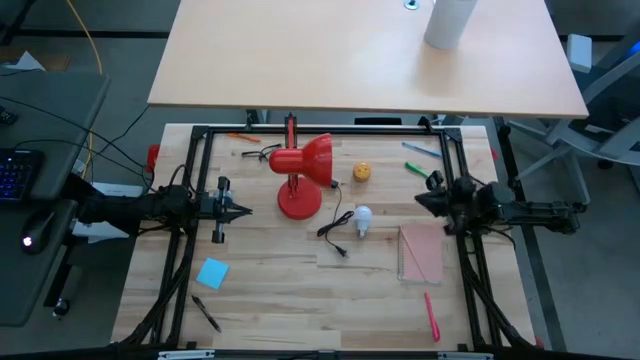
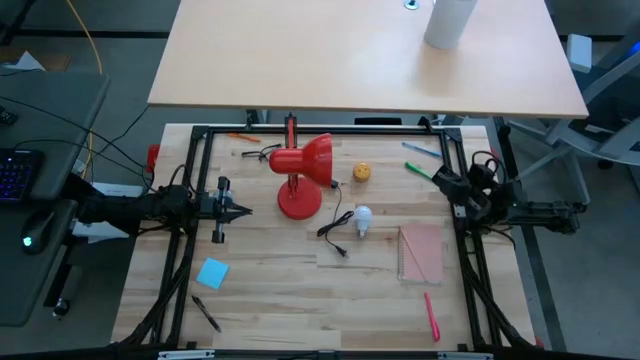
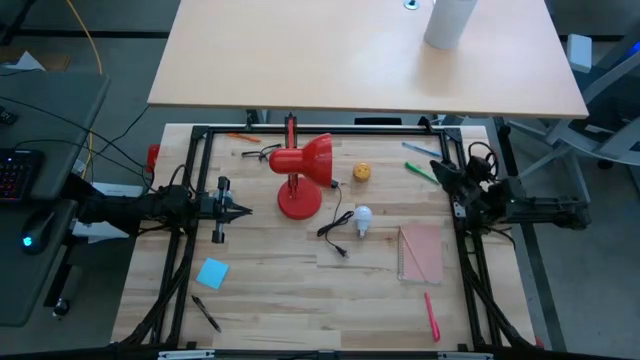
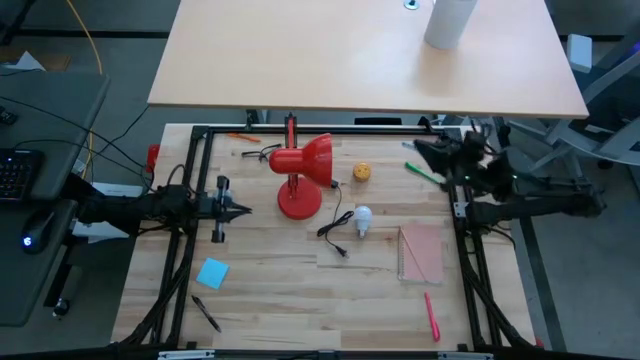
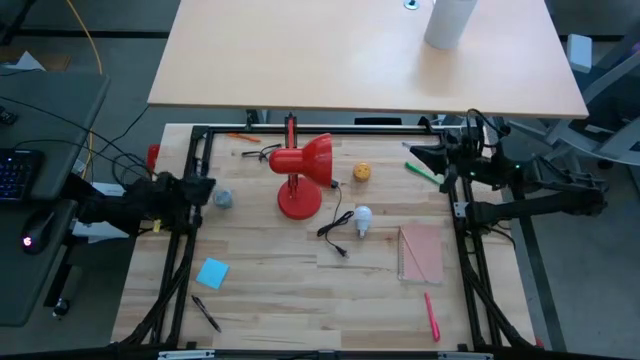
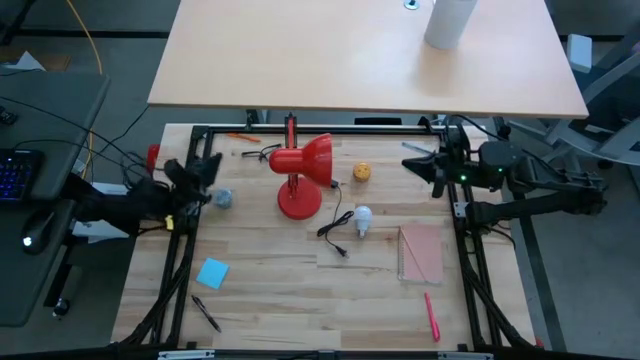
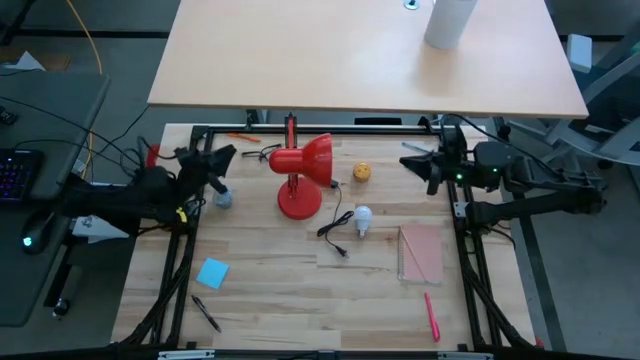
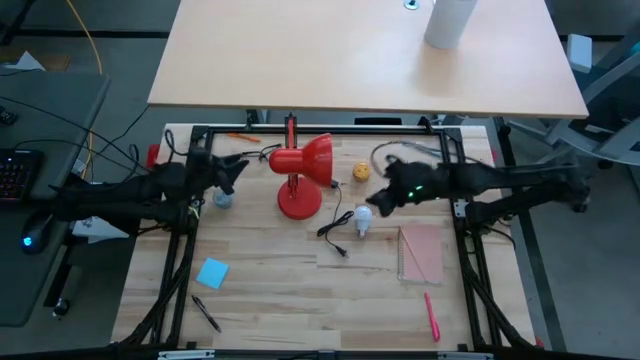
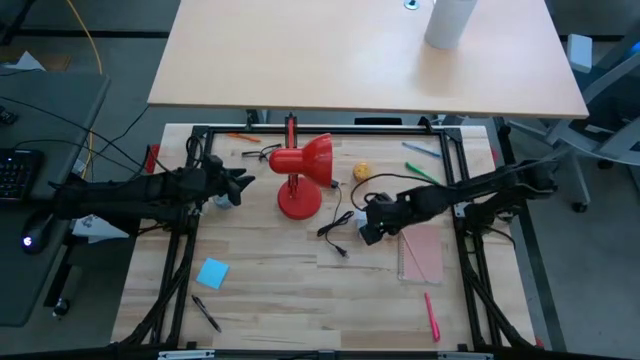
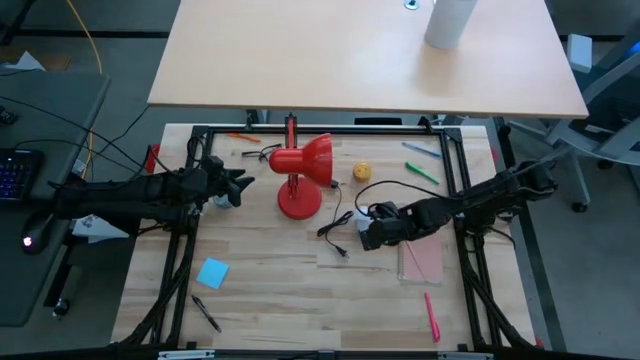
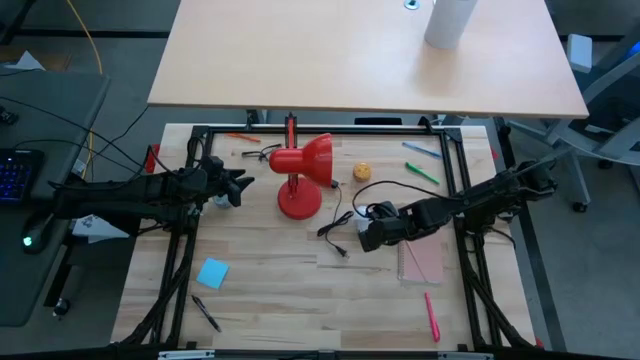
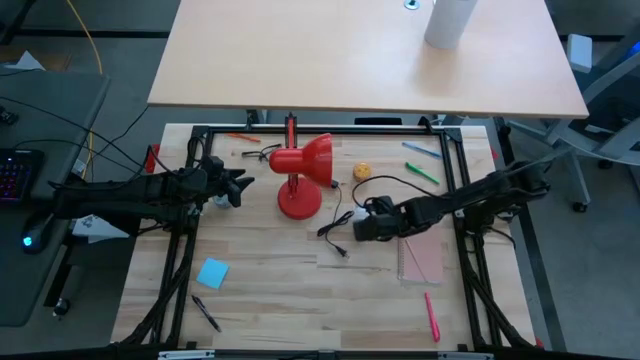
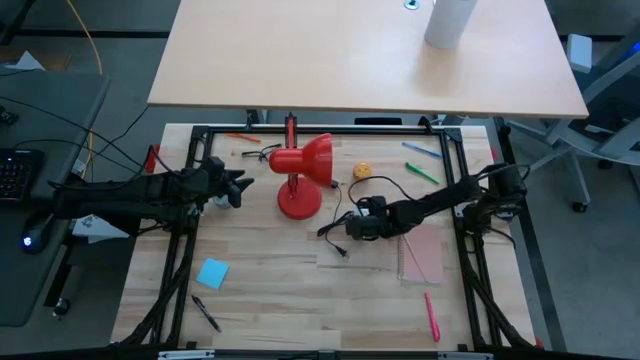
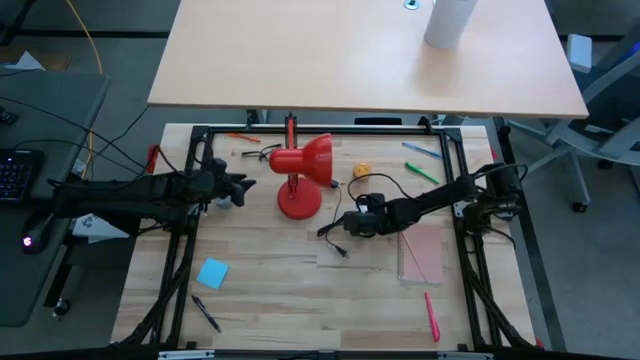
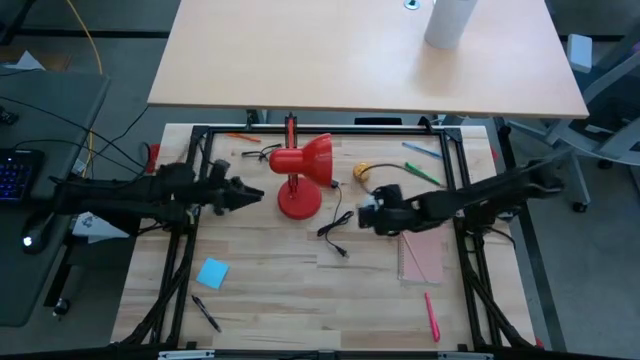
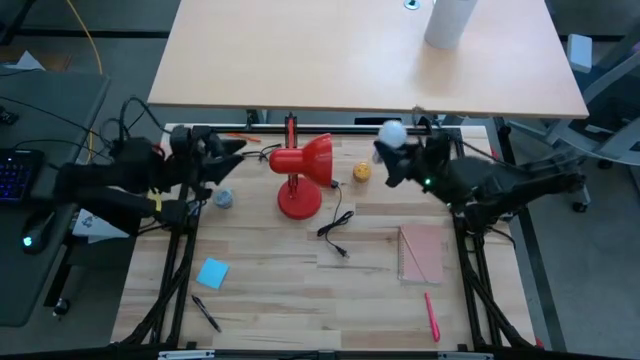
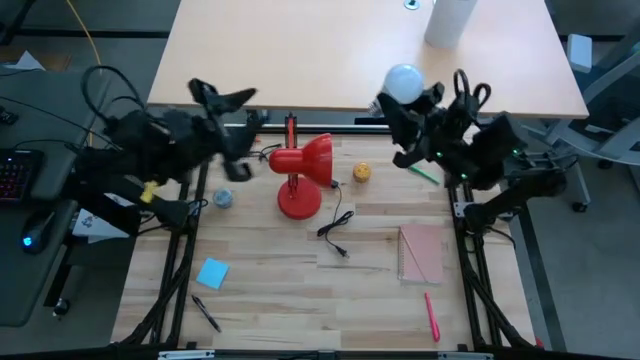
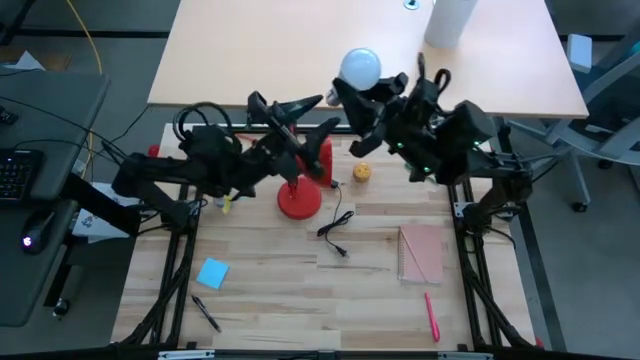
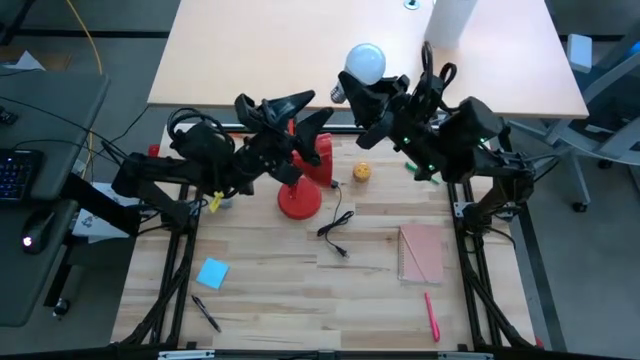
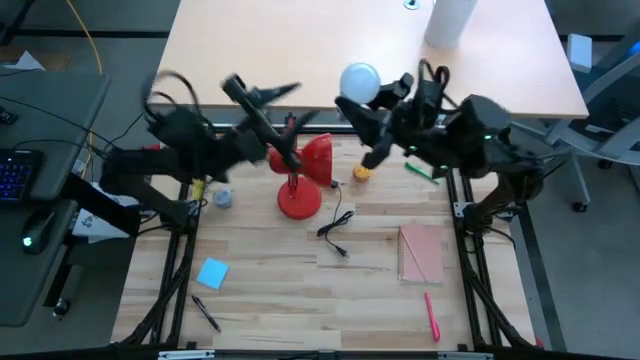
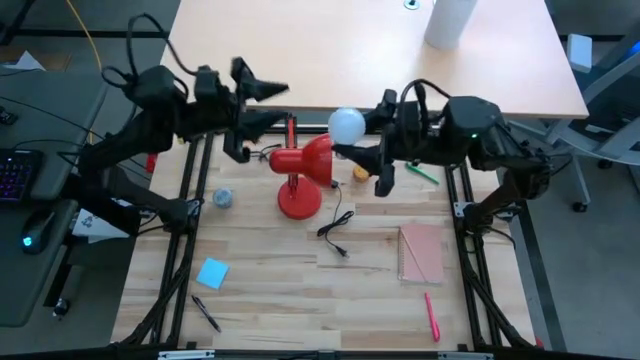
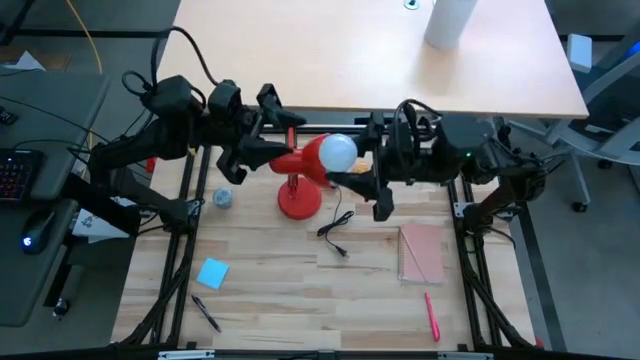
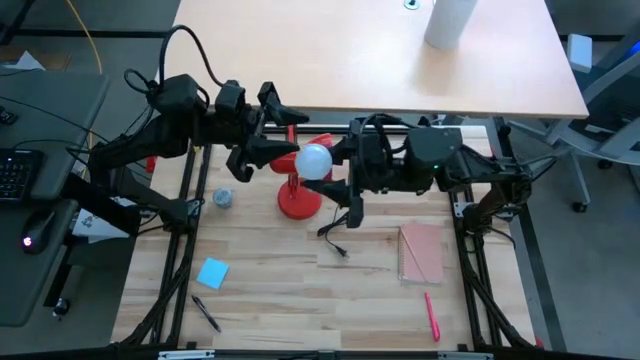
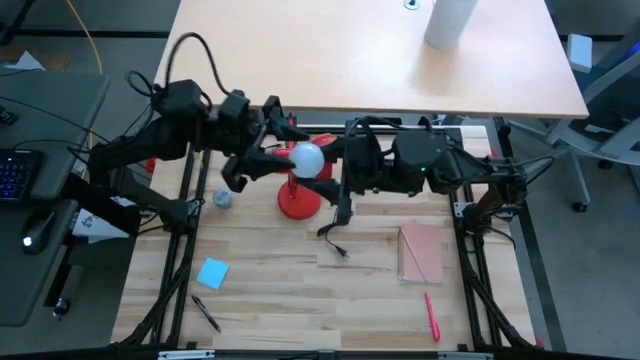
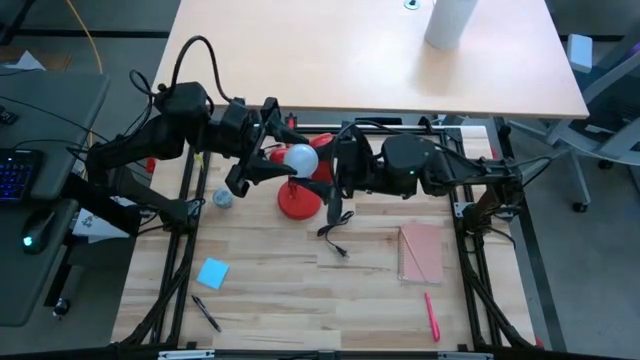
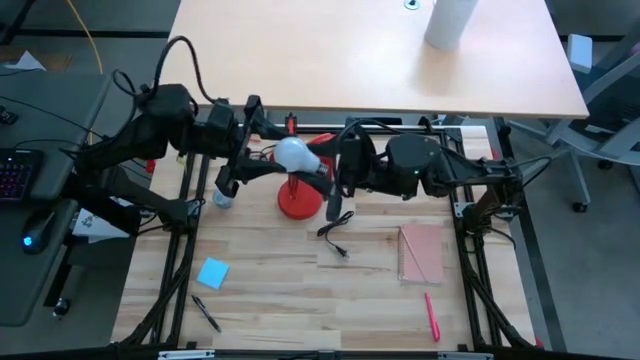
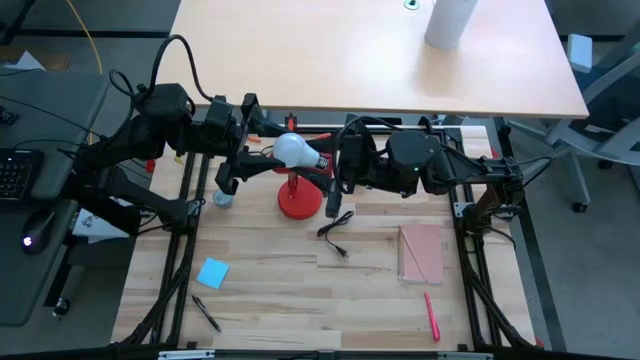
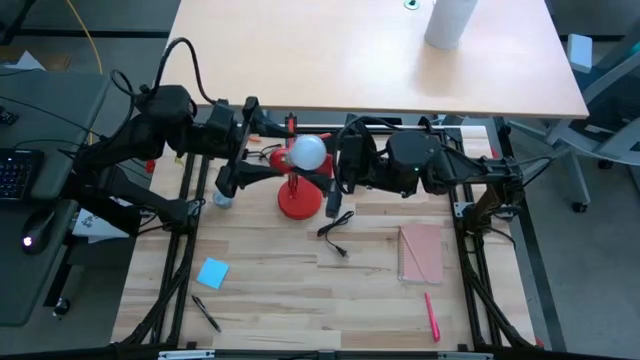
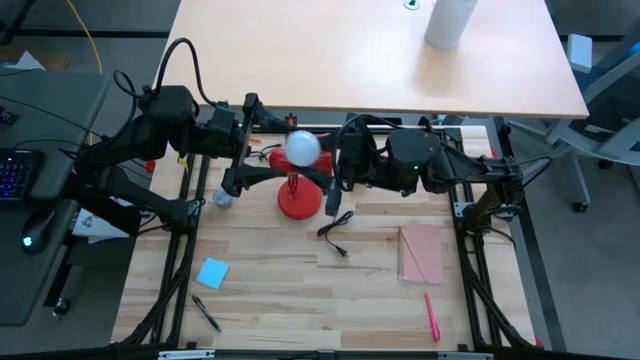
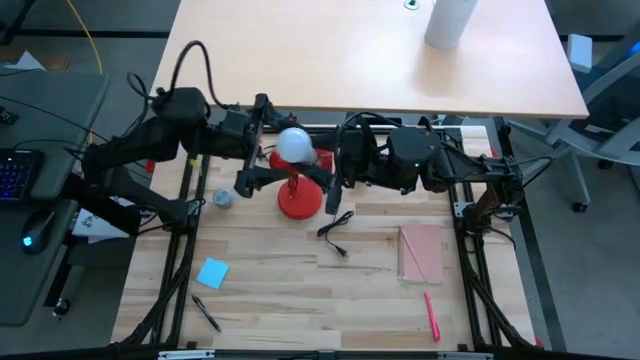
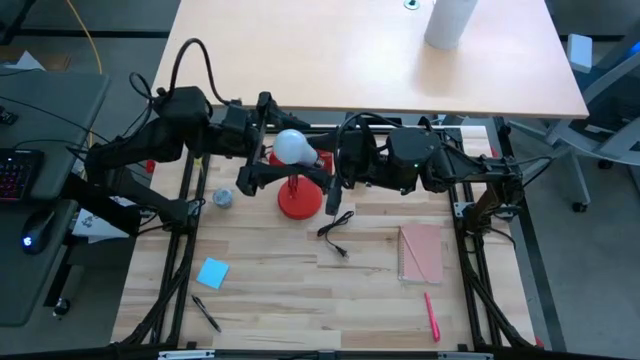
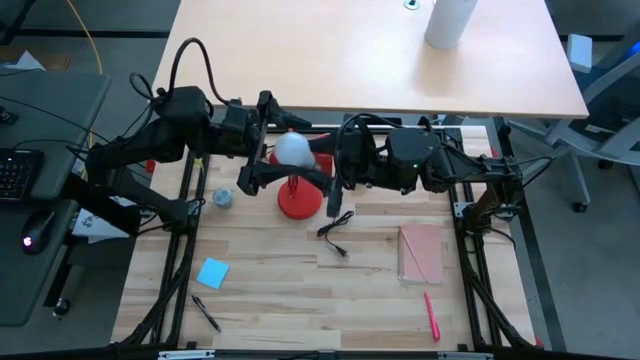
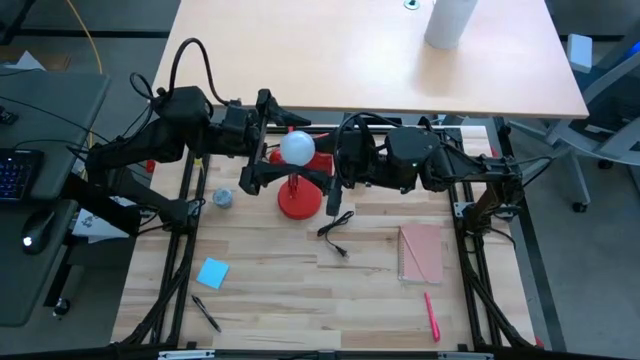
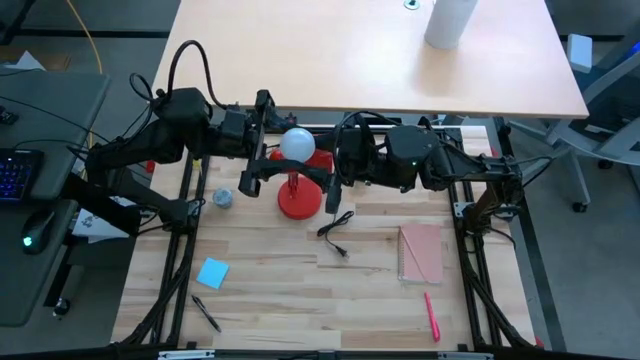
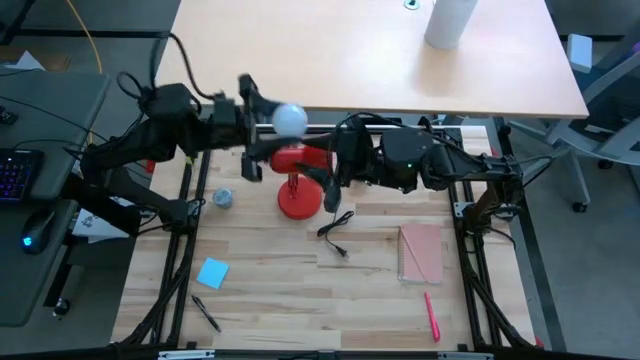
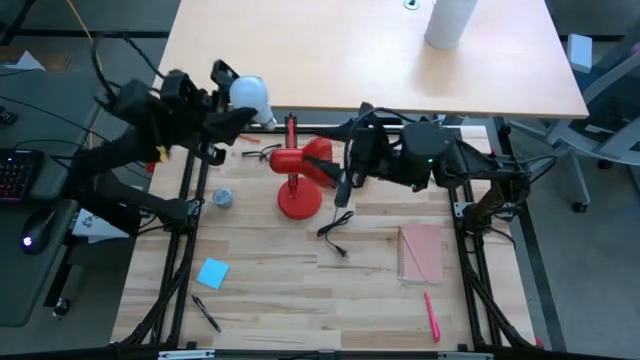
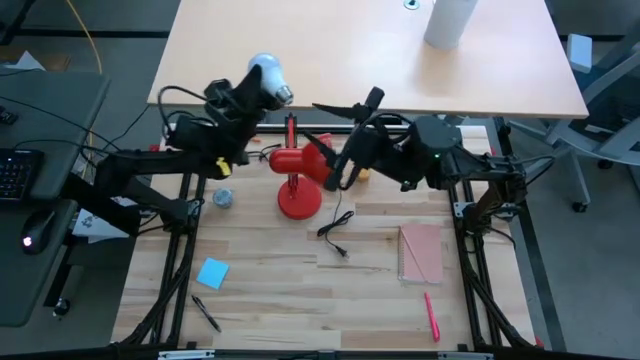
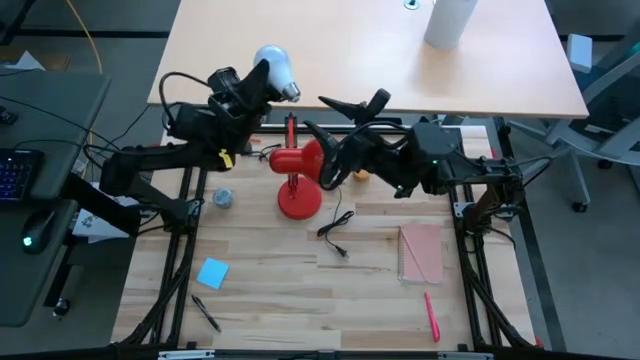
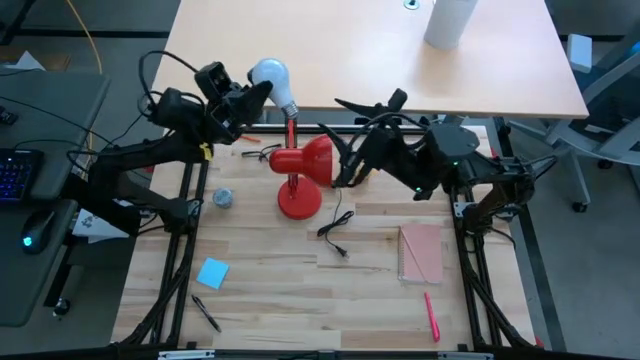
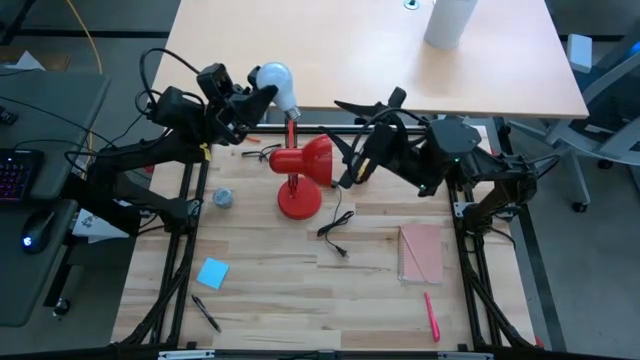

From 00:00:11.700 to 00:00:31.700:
Task: Screw lightbulb
Insert the lightbulb into the lamp
